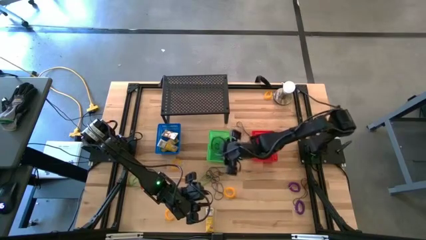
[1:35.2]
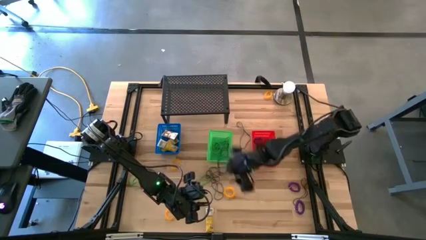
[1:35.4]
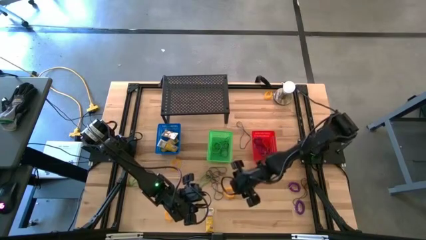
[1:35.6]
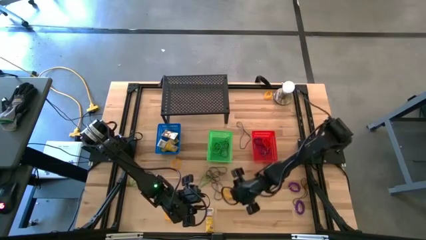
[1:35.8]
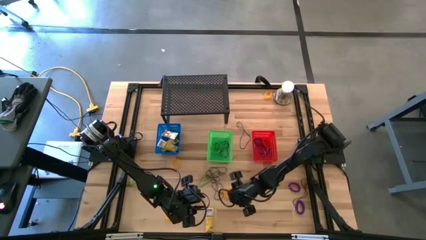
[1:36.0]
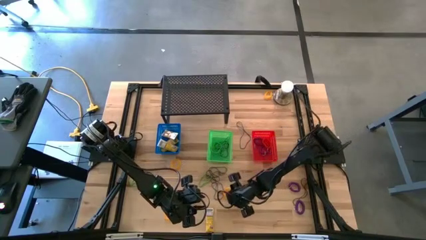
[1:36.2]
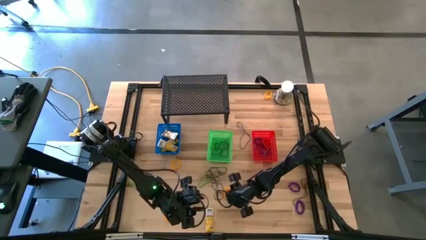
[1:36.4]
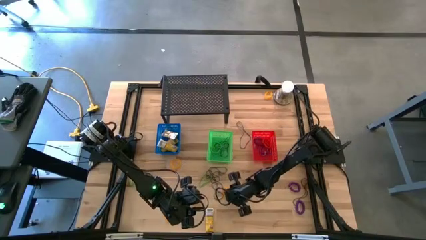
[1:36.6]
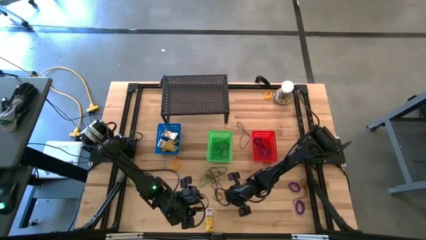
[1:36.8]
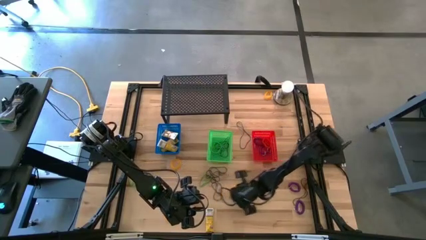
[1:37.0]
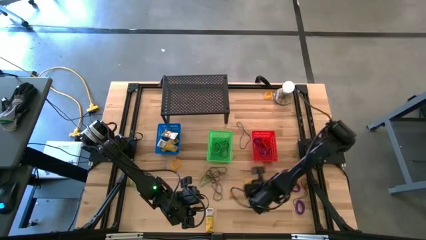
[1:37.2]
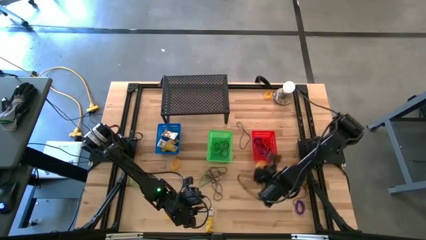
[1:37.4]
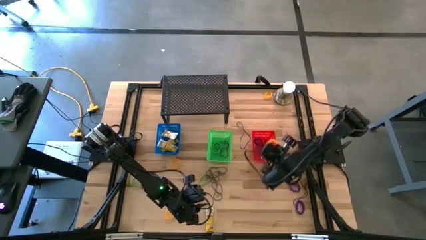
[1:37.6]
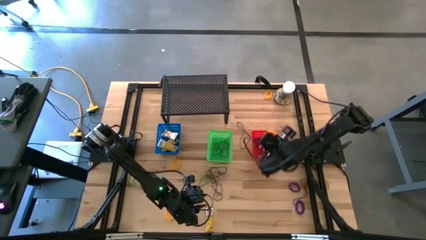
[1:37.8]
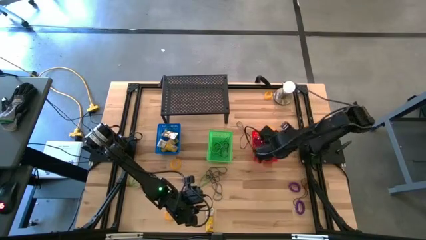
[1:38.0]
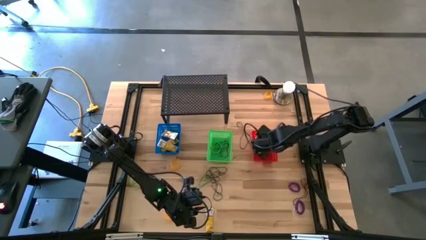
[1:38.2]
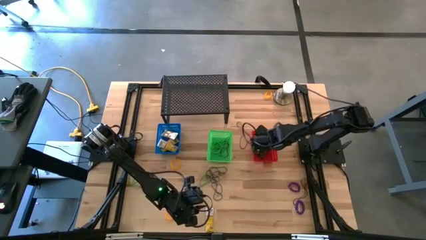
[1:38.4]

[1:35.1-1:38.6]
Task: Pick & Place Office Desk Supplies
Put the yellow spring keychain into the red bin

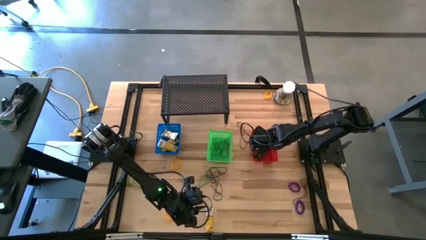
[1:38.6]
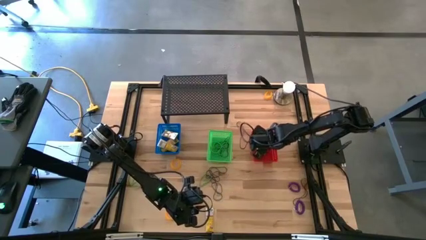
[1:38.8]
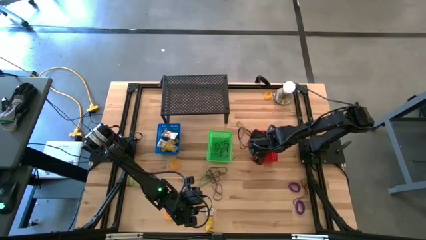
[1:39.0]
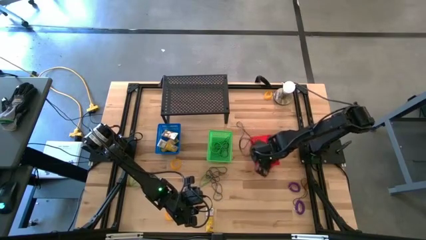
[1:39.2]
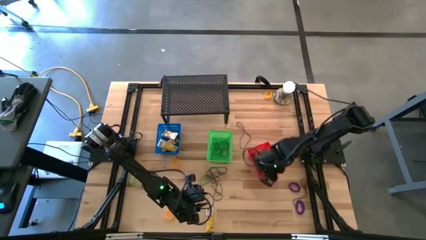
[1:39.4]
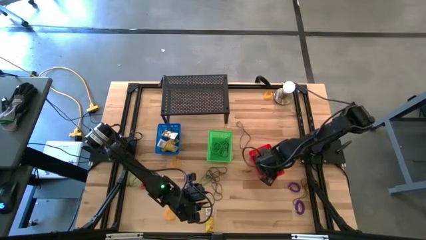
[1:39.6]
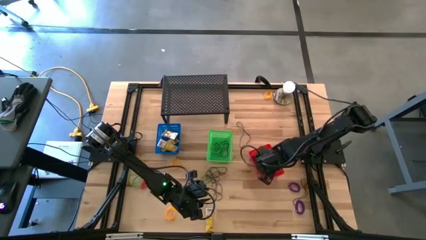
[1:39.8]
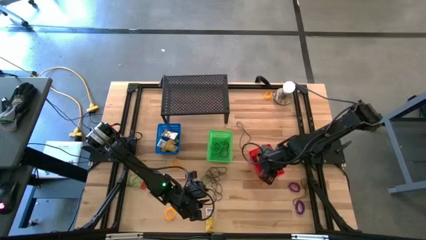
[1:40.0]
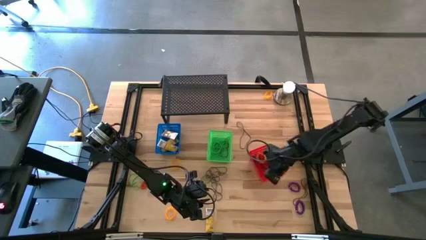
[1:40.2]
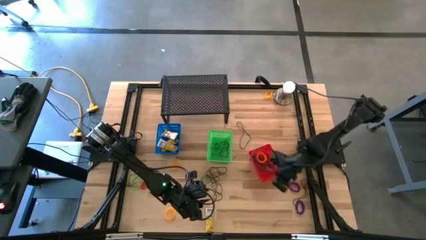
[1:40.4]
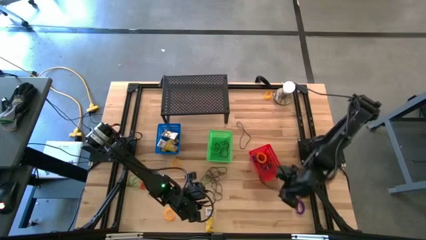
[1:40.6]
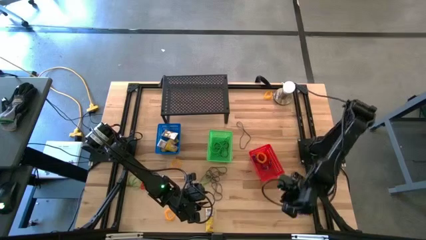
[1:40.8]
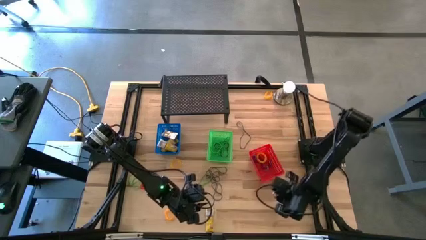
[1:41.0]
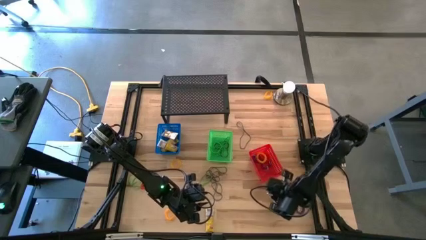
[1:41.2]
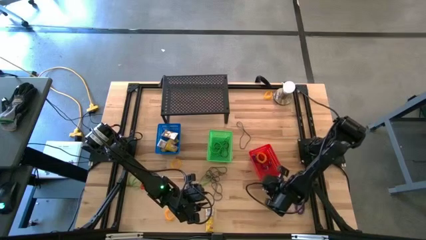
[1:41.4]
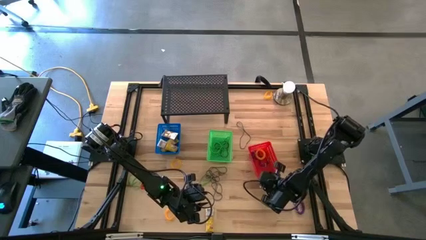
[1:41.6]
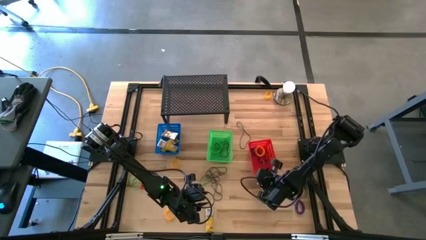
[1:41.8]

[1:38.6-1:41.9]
Adjust the red bin

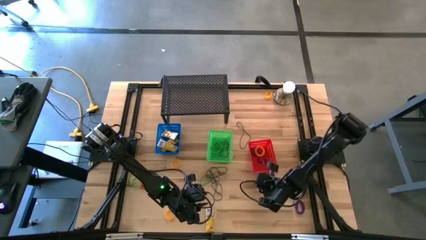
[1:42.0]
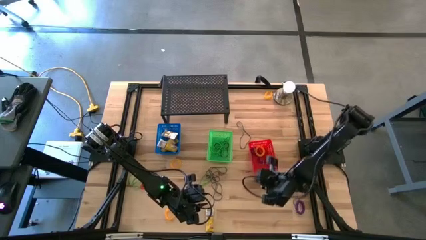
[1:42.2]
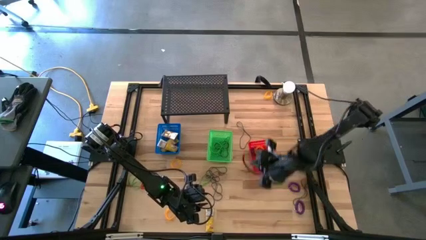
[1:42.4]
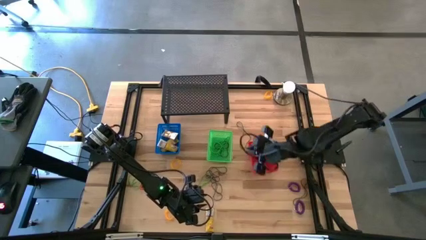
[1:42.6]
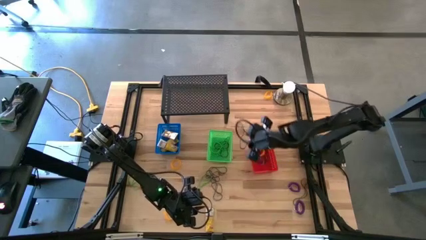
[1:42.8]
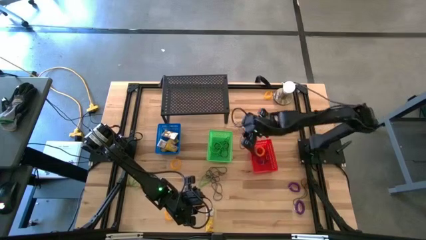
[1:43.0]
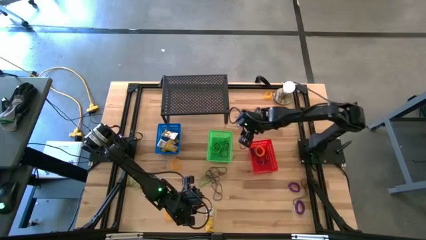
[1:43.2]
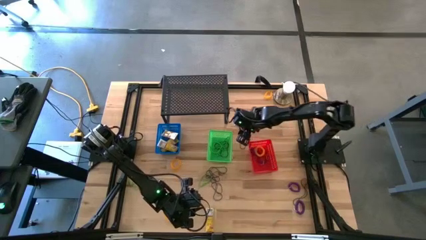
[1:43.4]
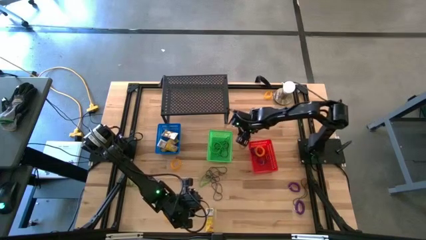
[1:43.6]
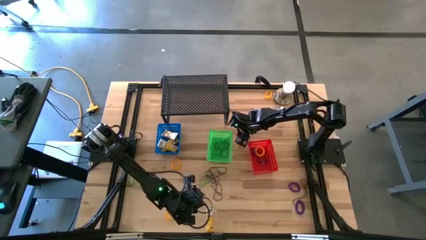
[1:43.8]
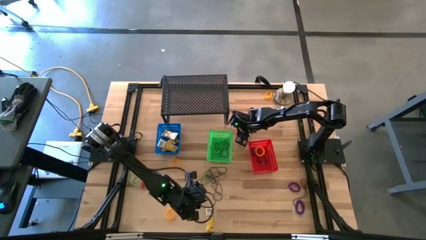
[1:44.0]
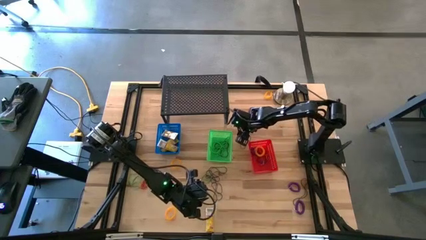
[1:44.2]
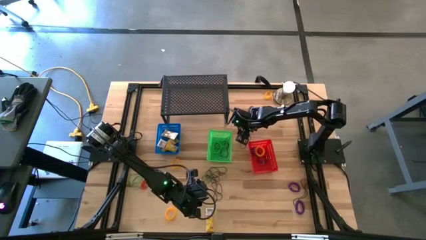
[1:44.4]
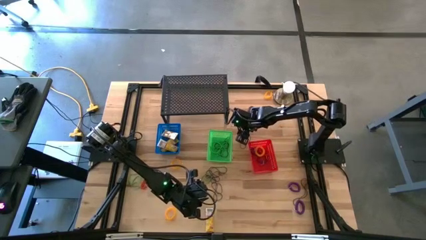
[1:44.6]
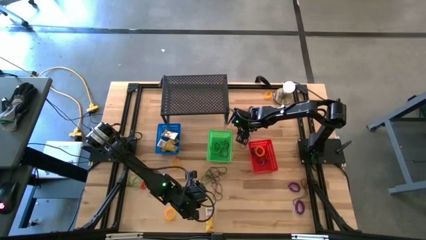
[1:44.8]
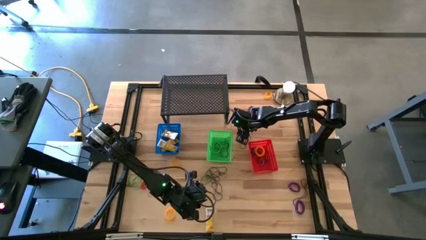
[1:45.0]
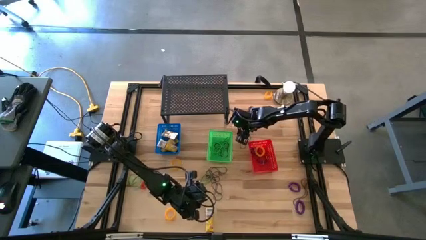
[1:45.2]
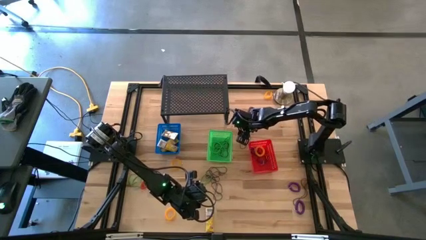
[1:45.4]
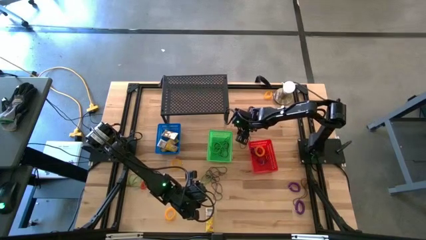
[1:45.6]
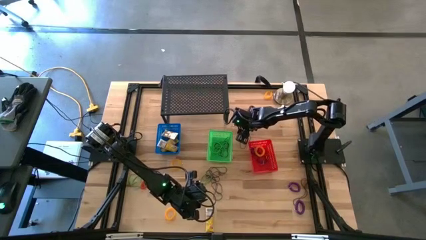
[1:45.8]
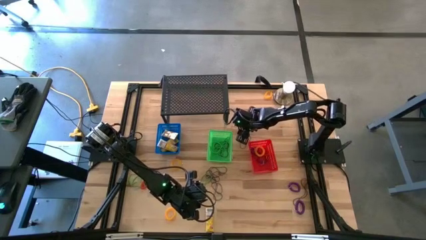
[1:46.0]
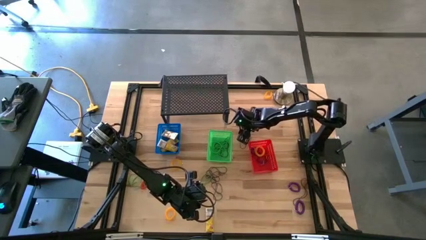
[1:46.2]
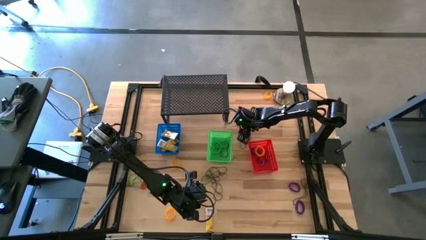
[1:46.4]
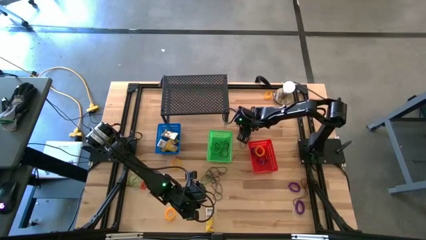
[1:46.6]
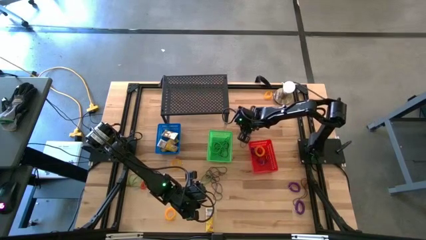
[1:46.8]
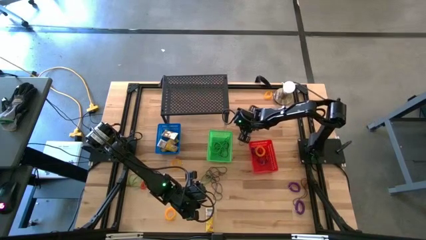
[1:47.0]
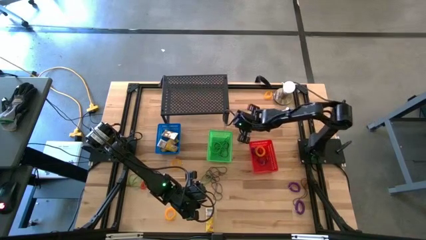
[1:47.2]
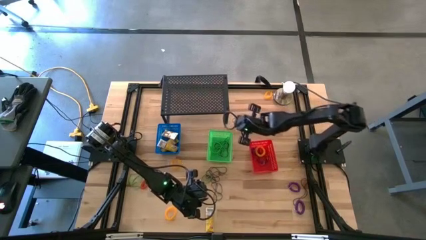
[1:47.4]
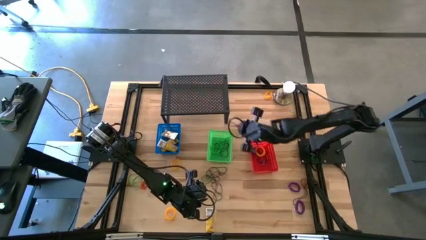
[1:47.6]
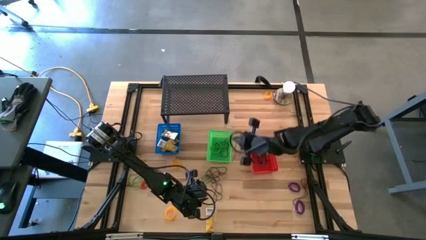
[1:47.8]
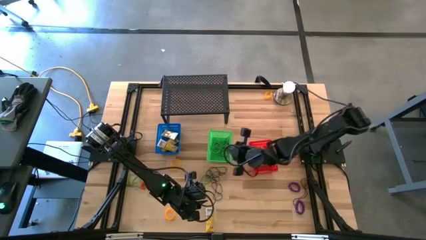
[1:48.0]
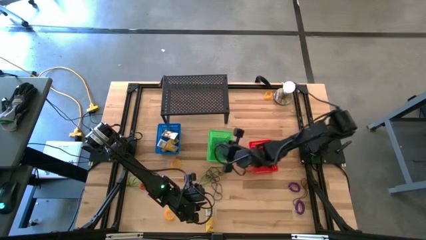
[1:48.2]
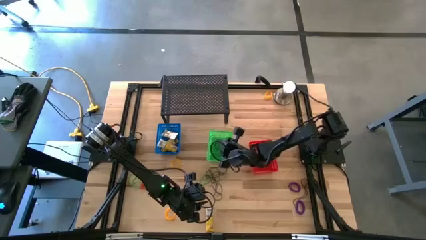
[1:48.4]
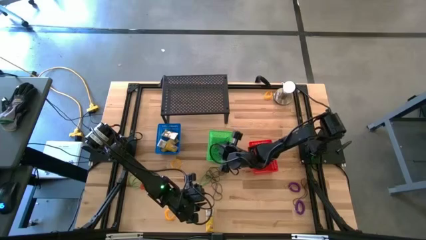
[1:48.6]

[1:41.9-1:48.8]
Put the black rubber band into the green bin

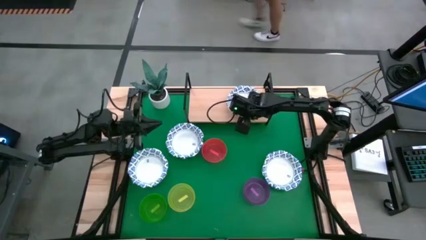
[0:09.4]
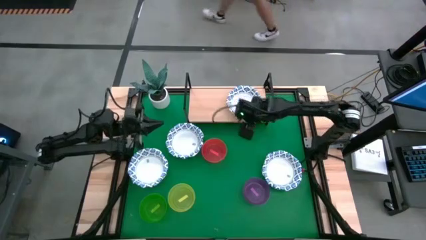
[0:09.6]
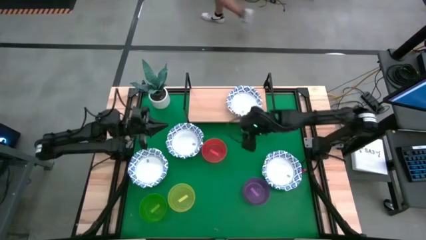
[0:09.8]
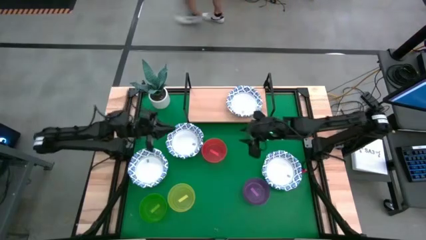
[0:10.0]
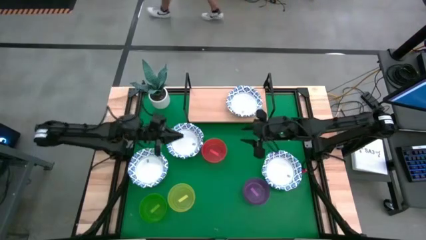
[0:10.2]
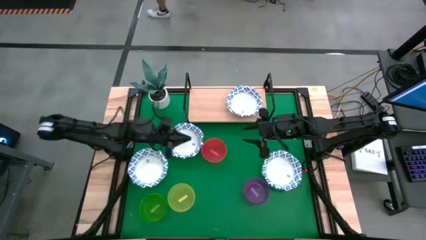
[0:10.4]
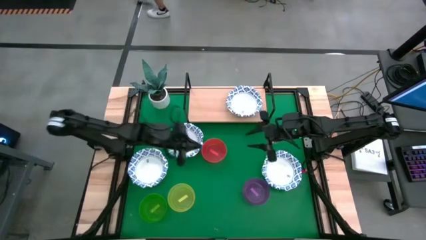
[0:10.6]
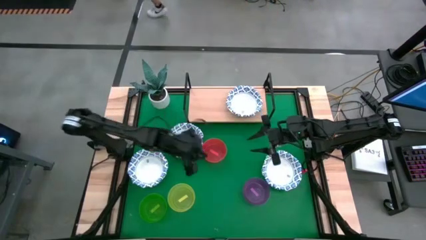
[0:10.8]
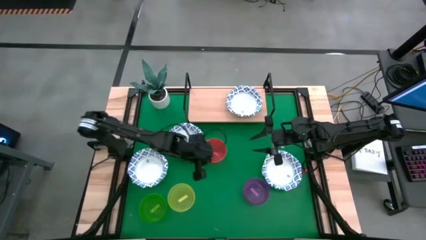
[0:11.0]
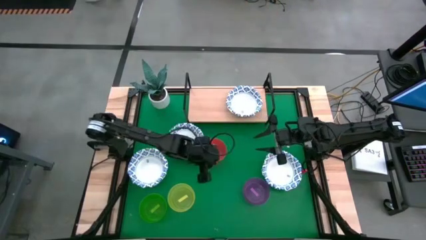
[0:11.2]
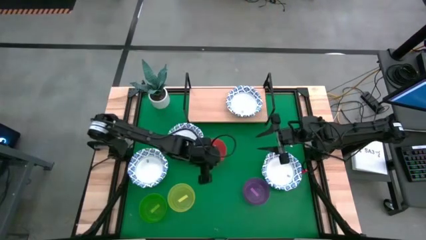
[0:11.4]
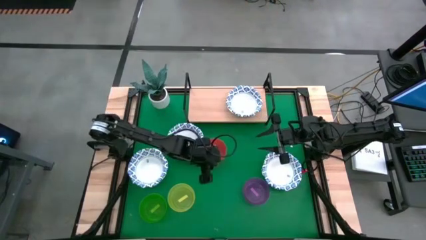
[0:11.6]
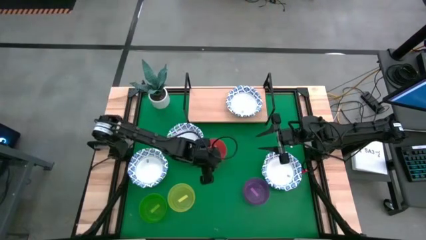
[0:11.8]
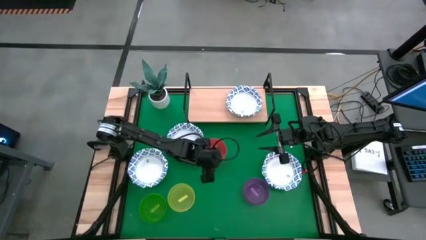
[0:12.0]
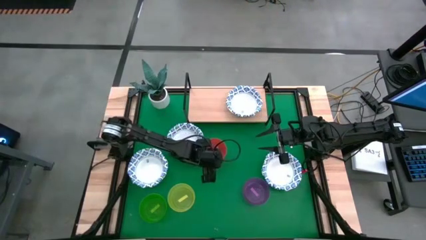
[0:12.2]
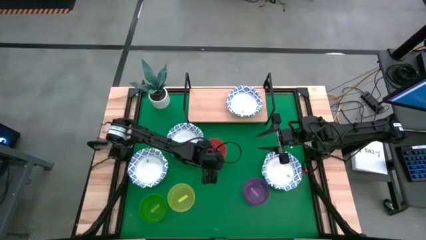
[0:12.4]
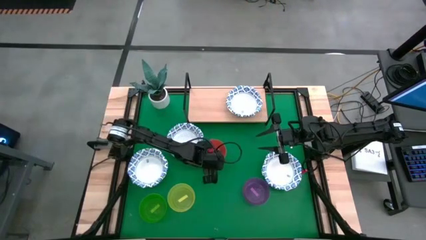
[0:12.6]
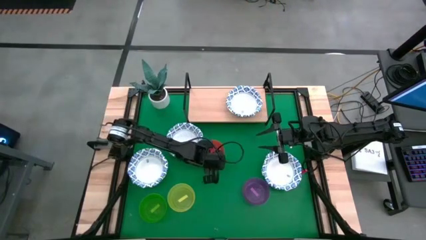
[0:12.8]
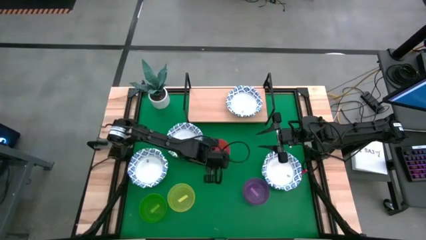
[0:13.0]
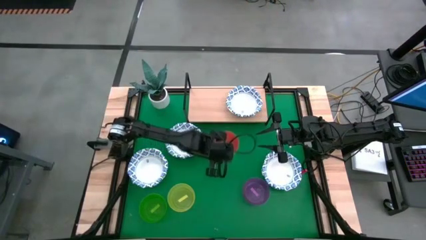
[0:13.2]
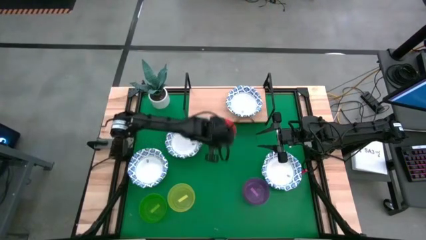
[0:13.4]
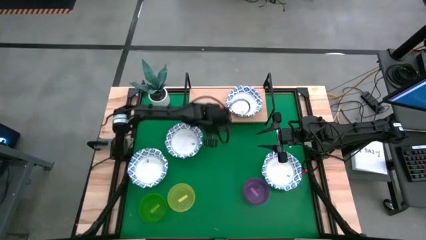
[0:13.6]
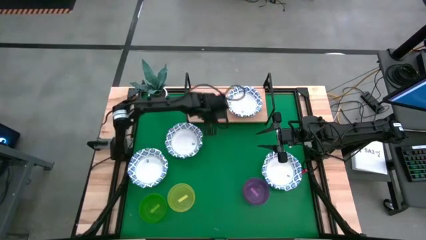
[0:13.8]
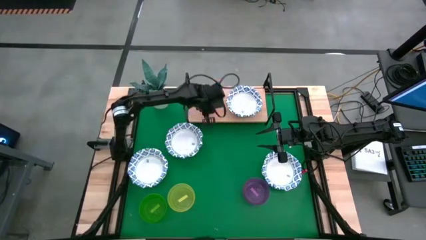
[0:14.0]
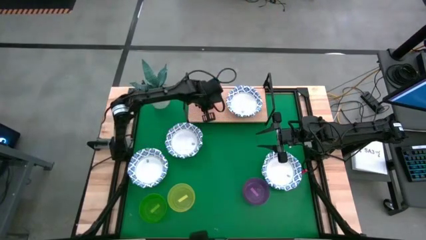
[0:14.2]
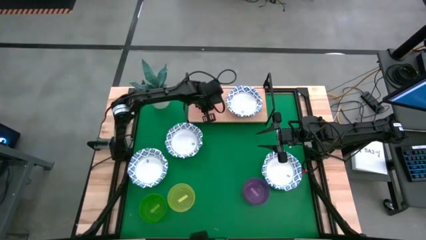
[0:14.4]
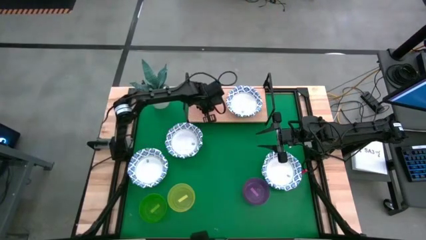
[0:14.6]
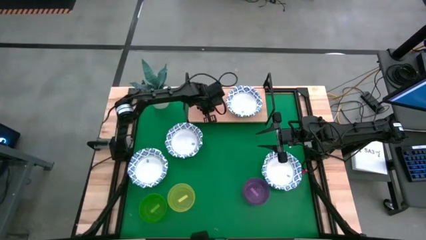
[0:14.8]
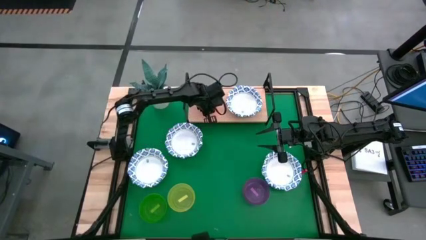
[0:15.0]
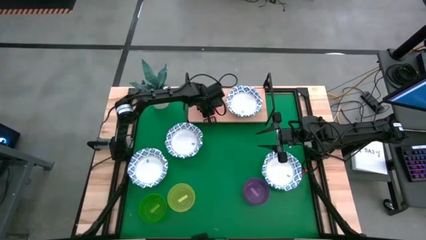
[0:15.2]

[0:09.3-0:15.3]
Task: Place and stack bowls onto a shelf
Put the orange bowl on the shelf
